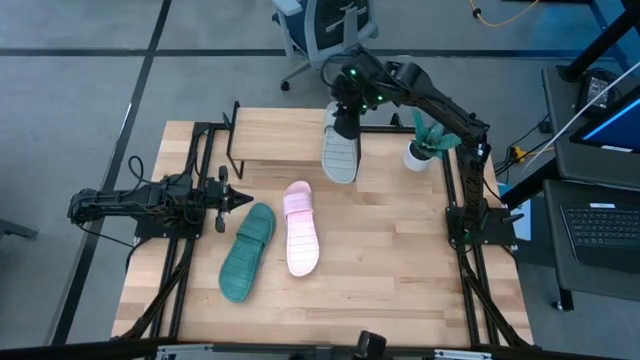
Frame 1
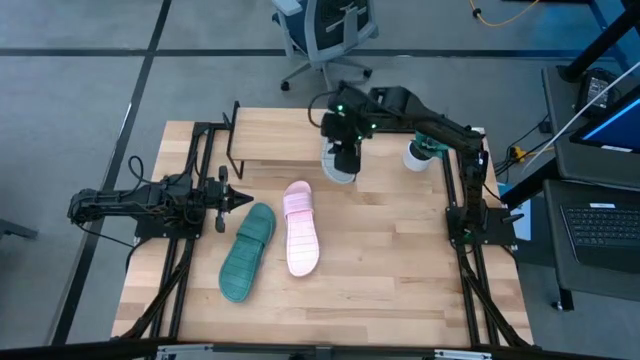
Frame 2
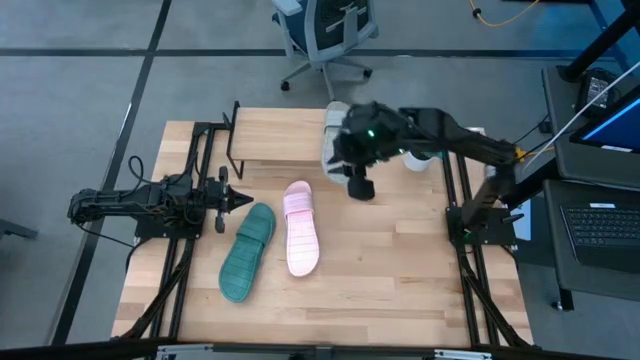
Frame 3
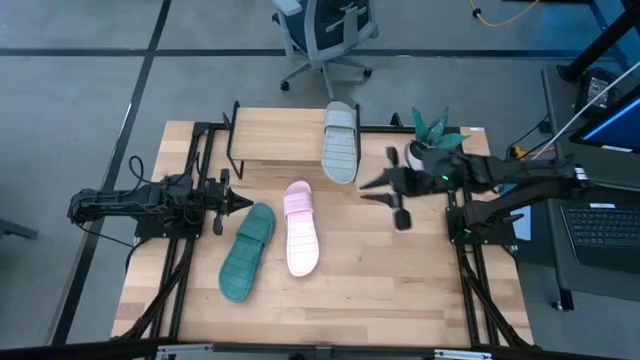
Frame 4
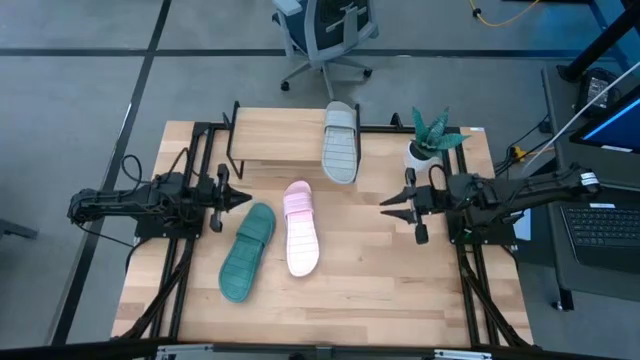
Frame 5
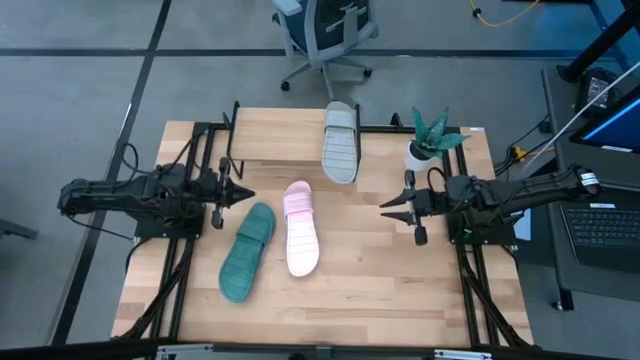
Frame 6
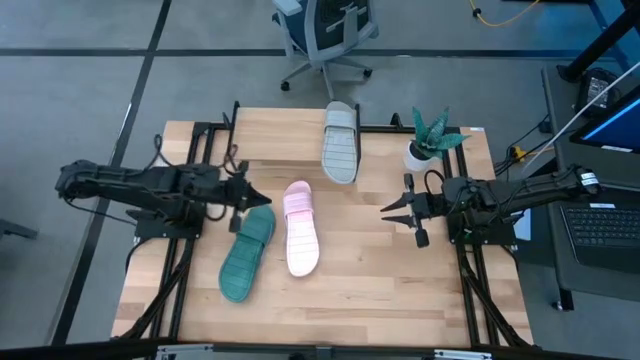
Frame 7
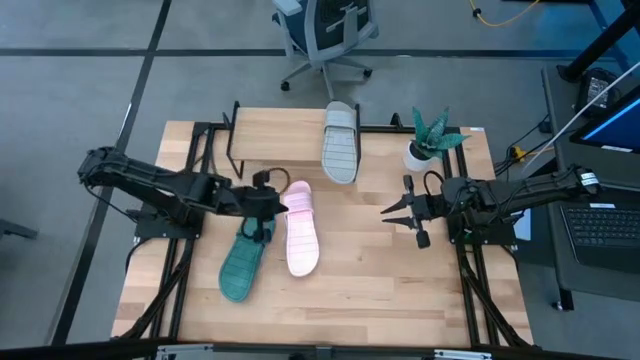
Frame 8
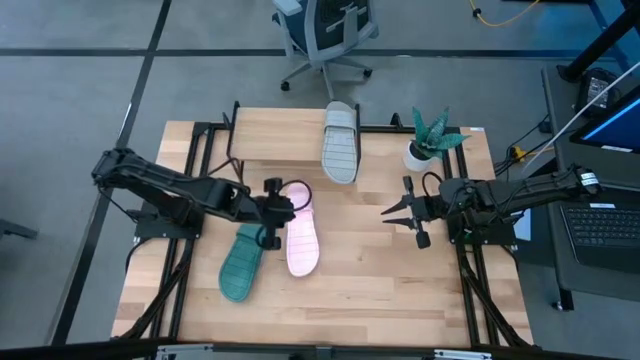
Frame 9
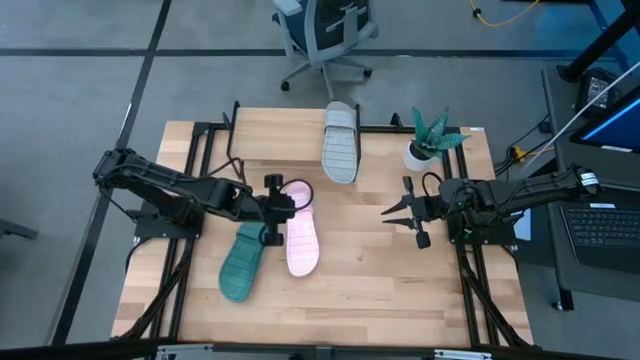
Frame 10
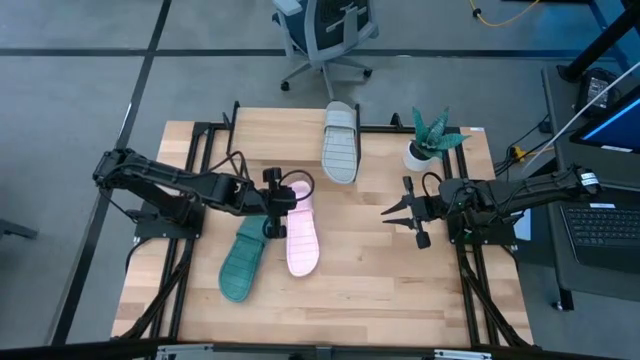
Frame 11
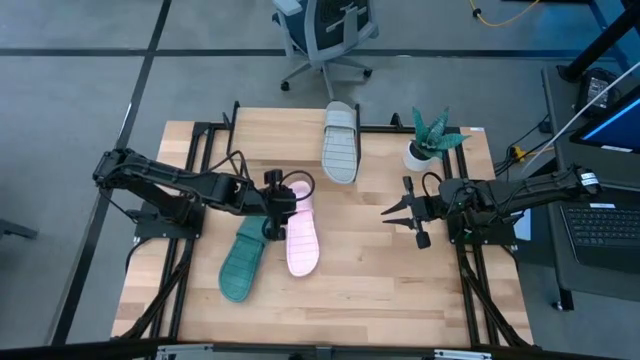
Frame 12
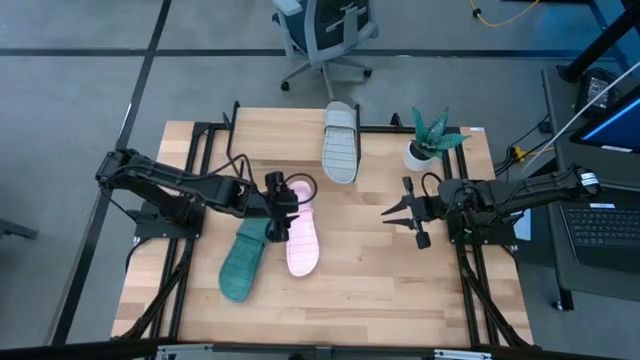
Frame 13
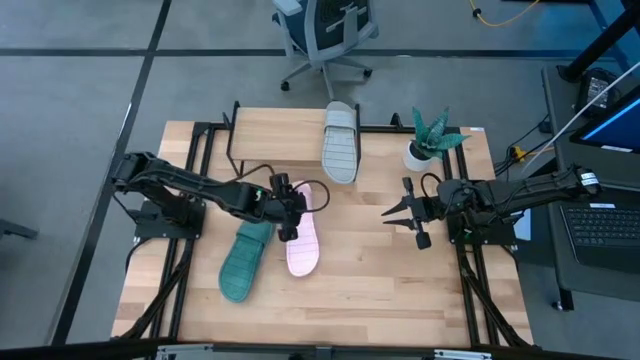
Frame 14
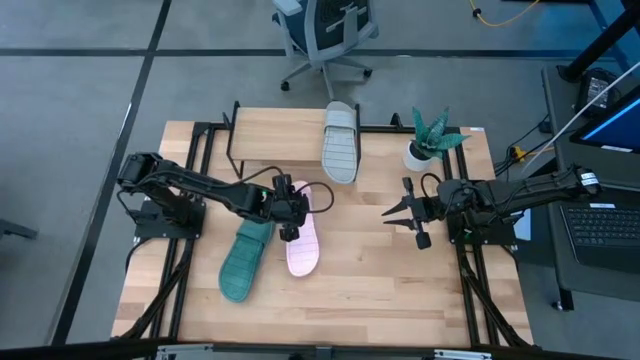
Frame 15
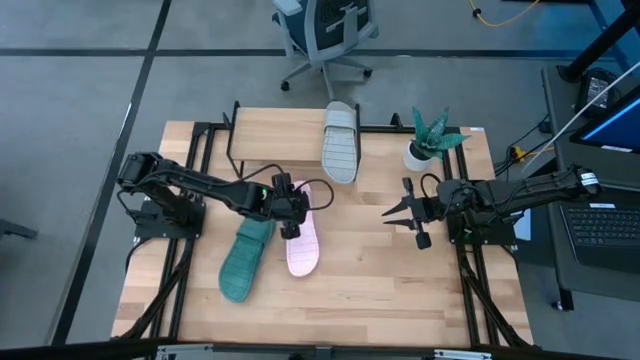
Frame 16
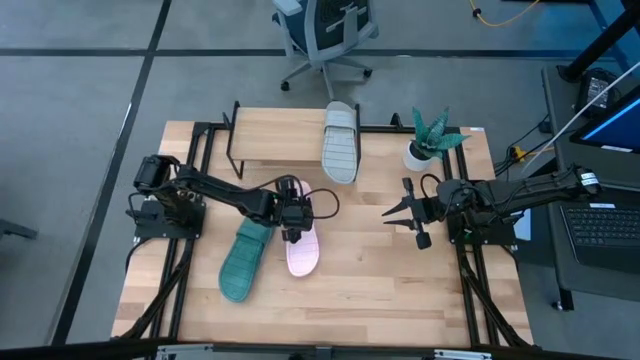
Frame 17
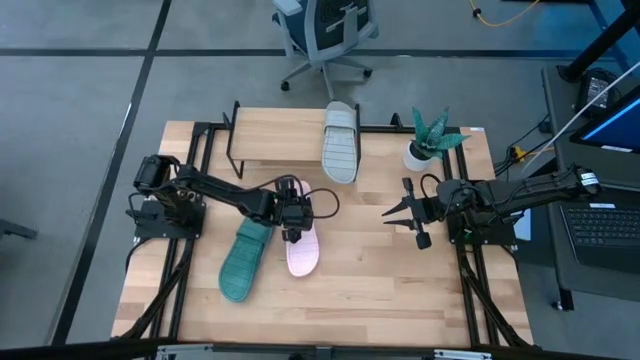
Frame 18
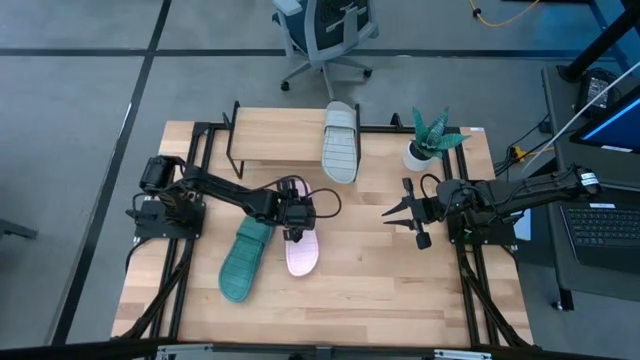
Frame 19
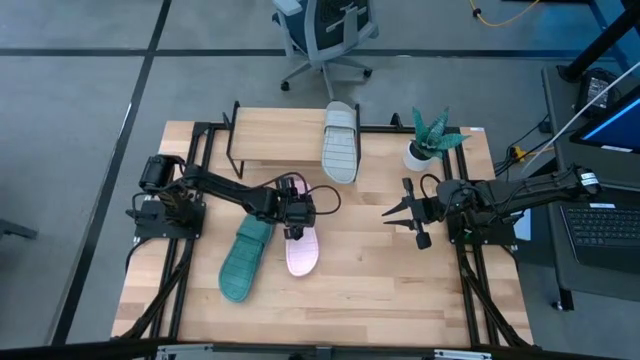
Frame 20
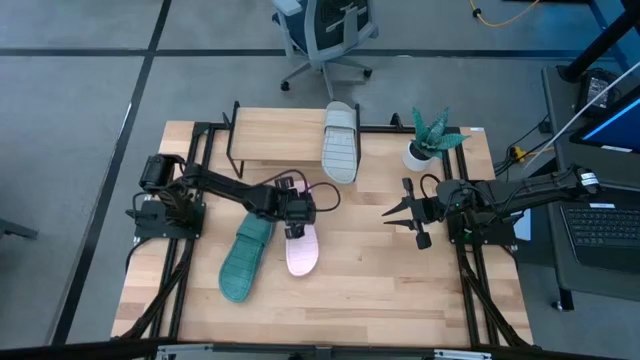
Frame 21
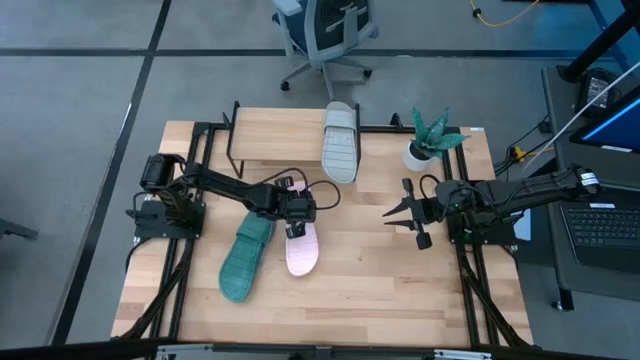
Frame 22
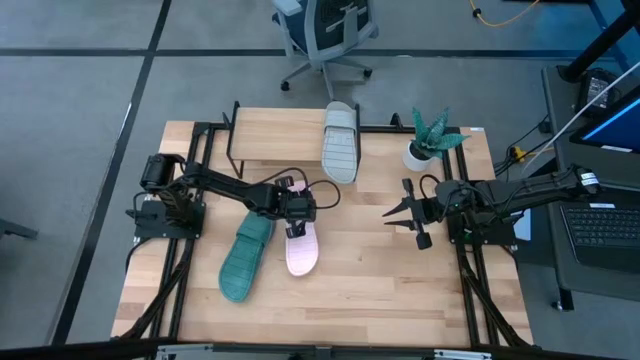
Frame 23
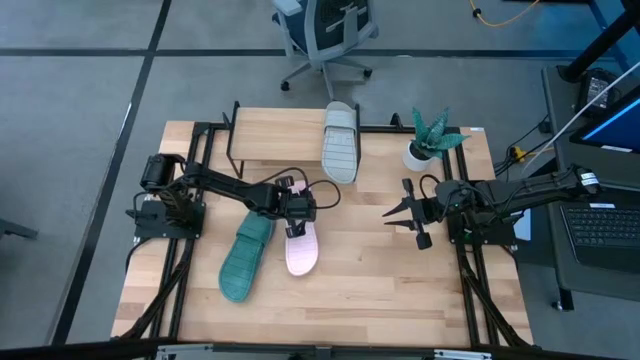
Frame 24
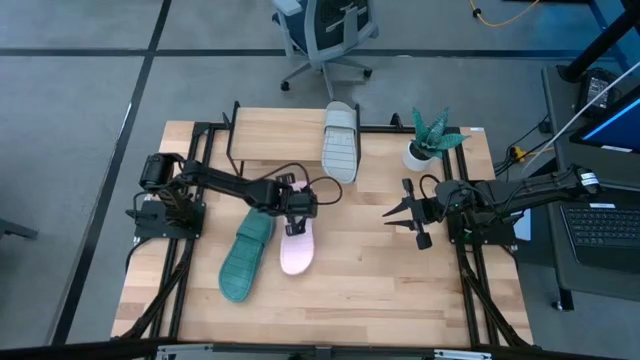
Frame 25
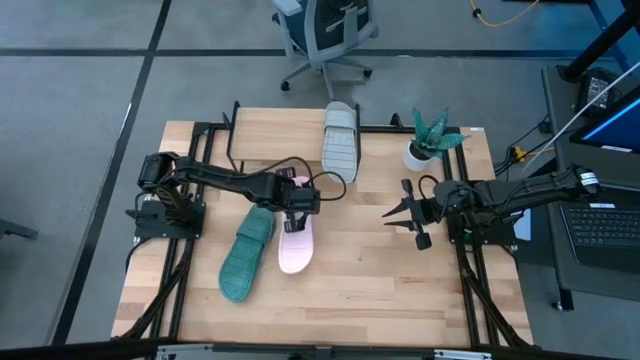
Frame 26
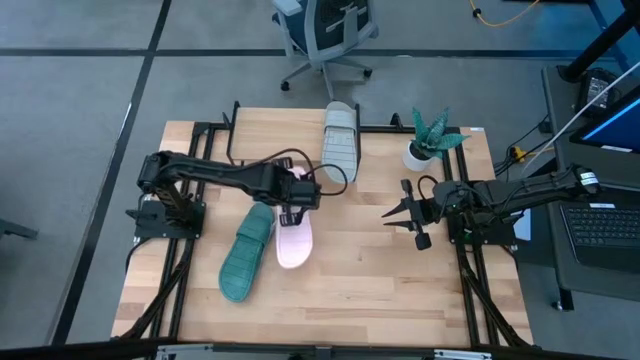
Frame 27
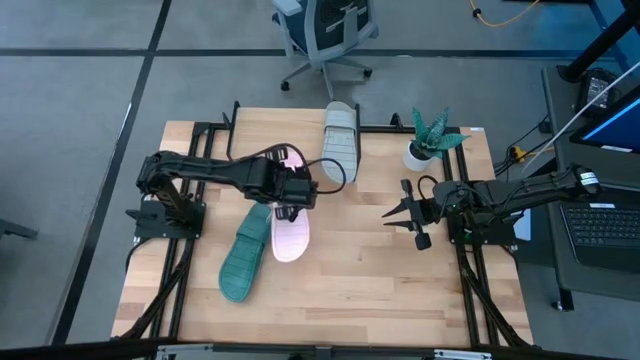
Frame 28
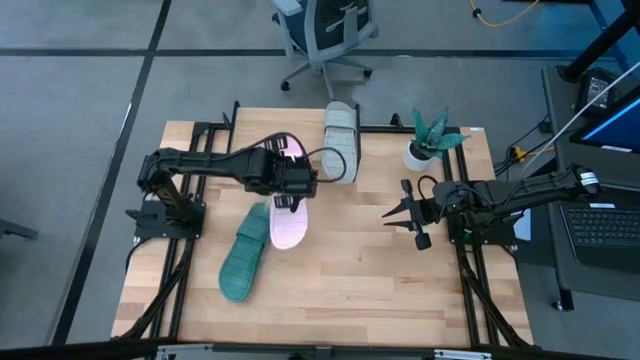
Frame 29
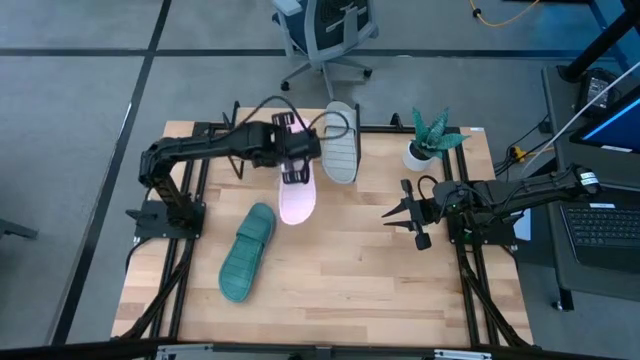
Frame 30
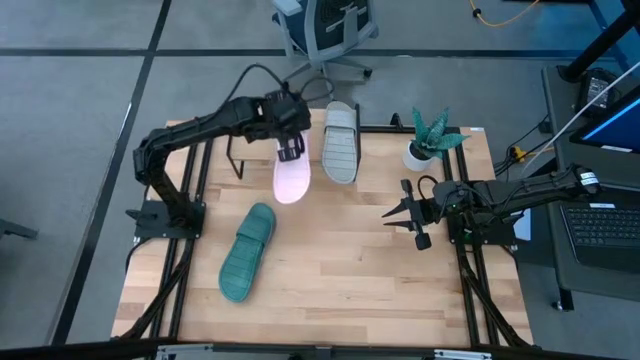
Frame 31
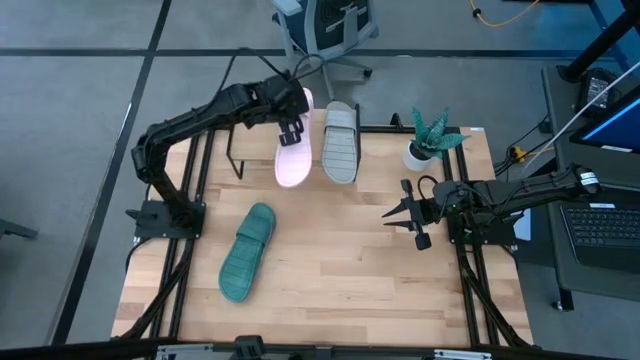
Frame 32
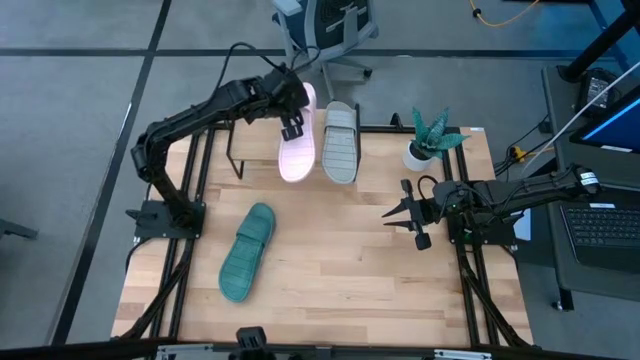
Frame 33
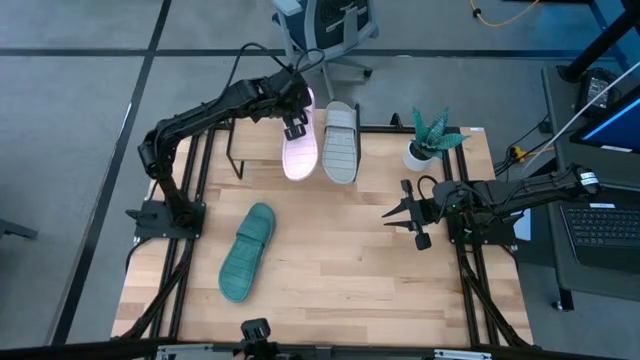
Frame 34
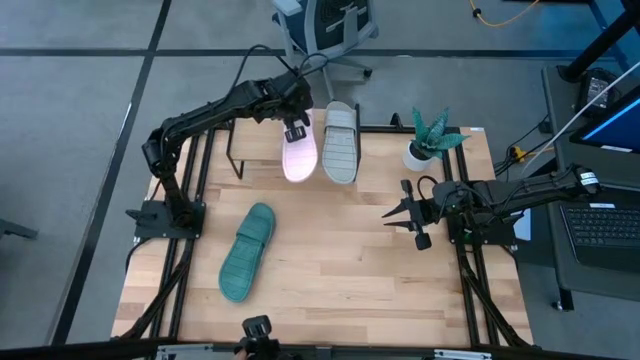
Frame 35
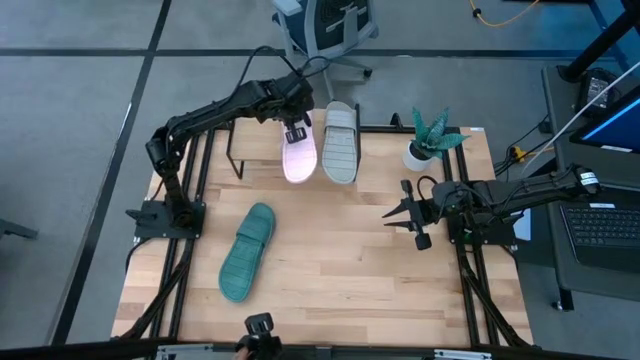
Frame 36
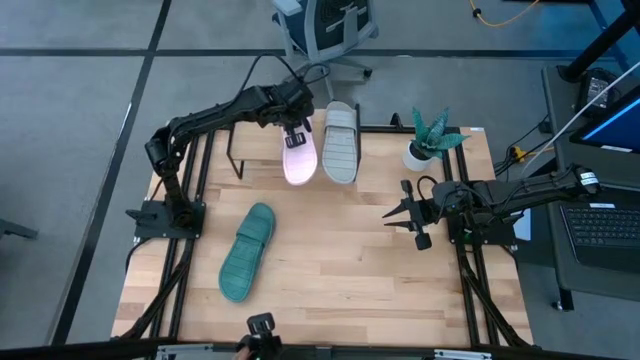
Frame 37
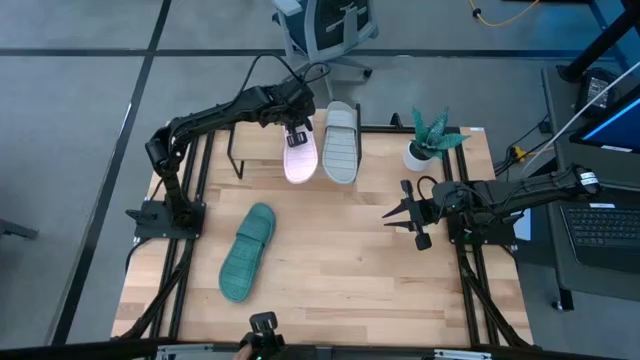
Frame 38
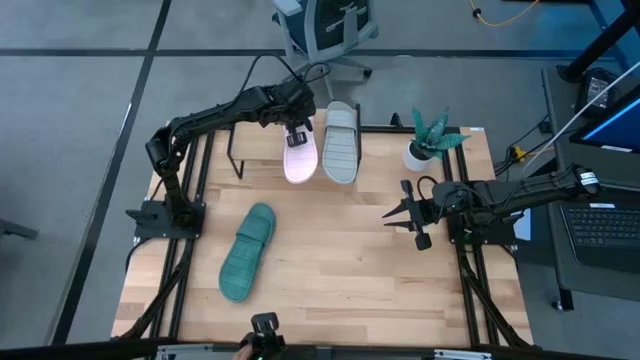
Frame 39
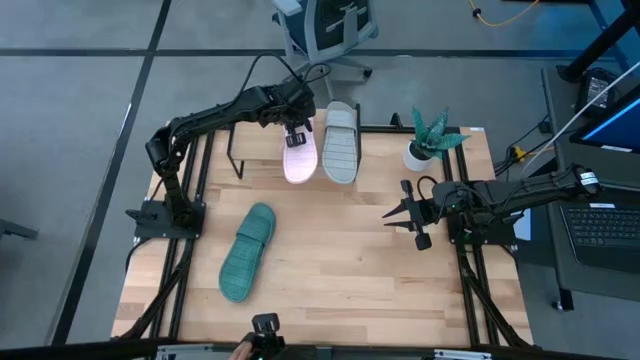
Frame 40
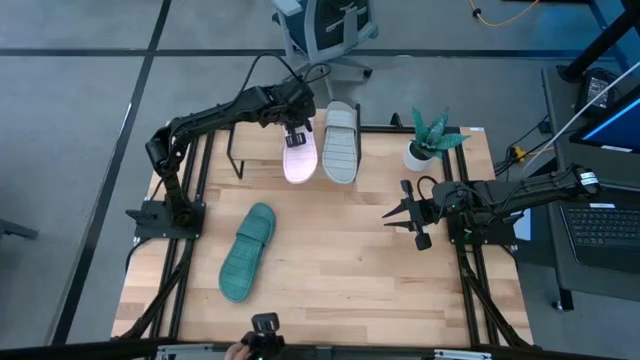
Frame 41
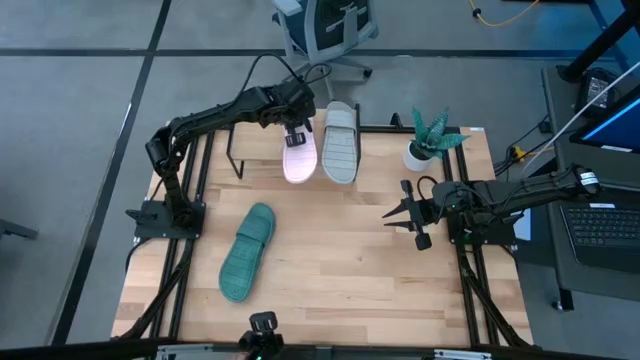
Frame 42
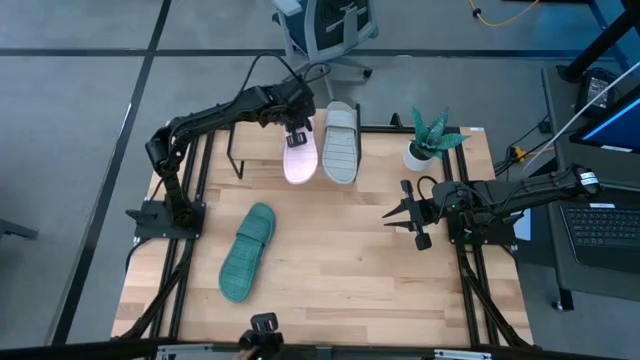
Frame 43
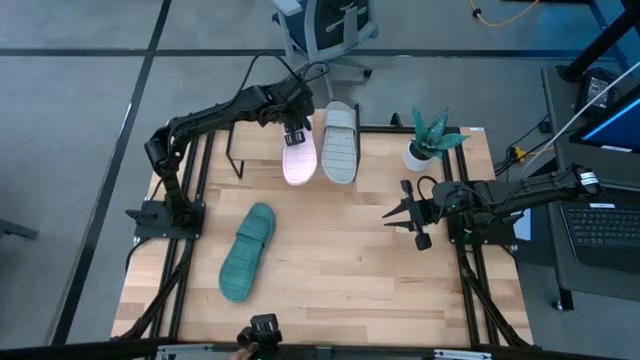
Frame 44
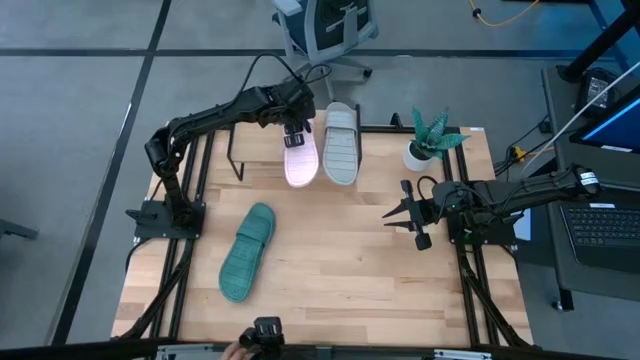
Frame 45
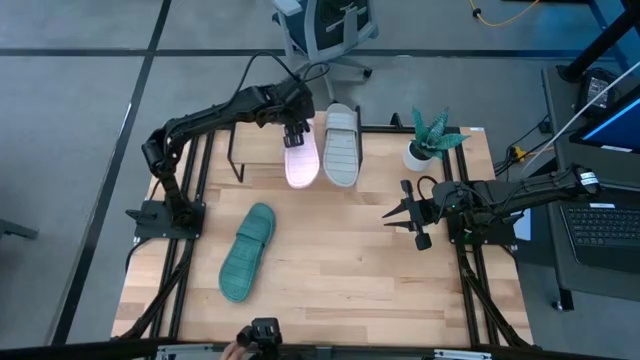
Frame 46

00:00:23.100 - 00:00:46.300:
Task: Pick and place slippers onto the shelf
Put the pair of pink slippers on the shelf
